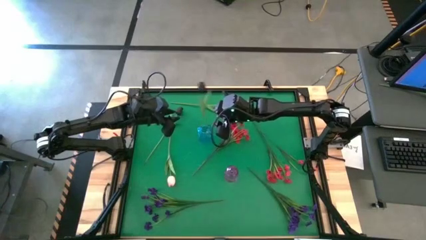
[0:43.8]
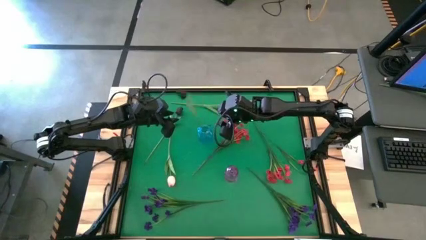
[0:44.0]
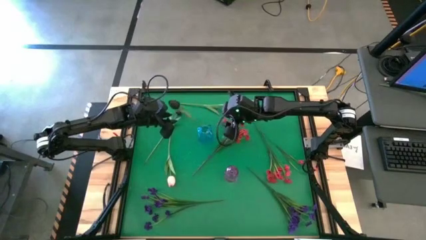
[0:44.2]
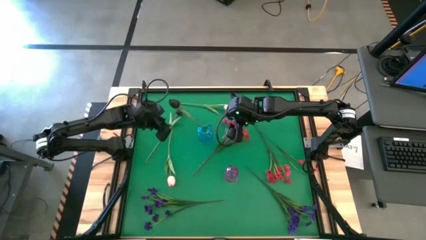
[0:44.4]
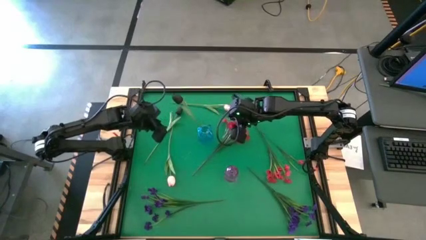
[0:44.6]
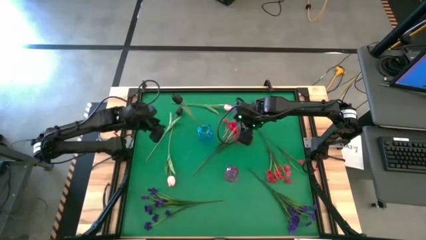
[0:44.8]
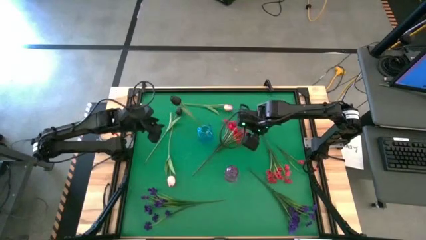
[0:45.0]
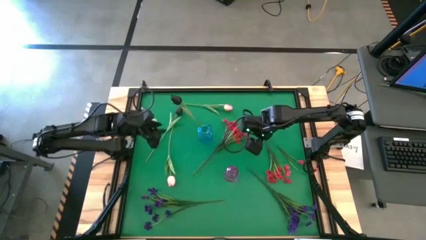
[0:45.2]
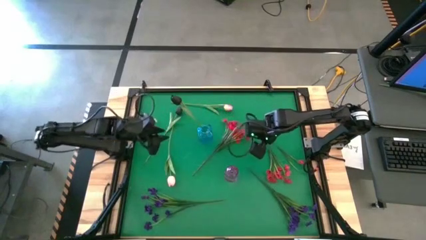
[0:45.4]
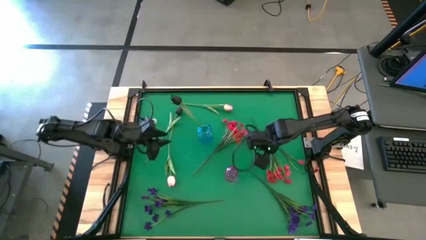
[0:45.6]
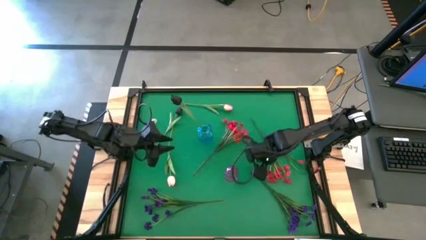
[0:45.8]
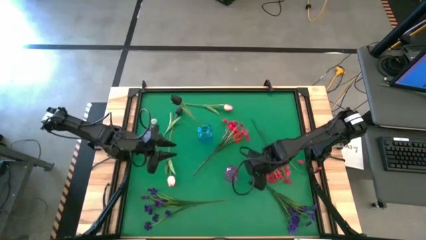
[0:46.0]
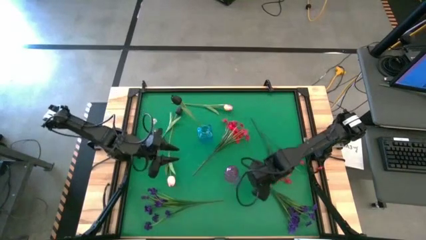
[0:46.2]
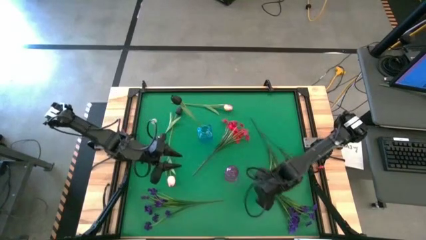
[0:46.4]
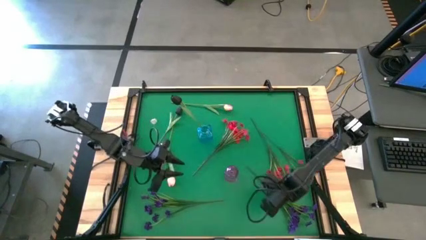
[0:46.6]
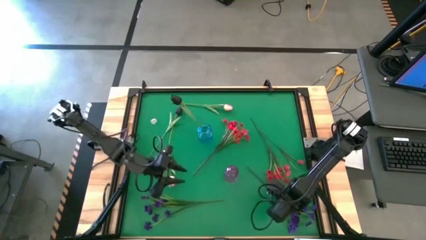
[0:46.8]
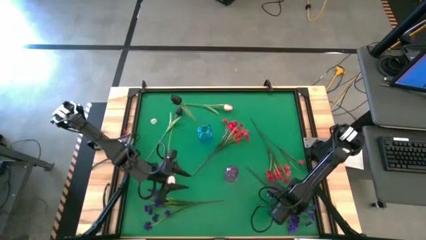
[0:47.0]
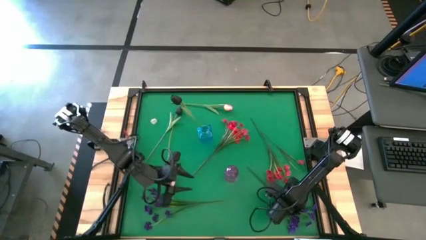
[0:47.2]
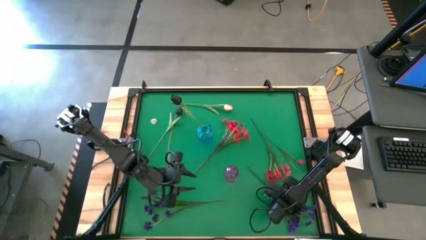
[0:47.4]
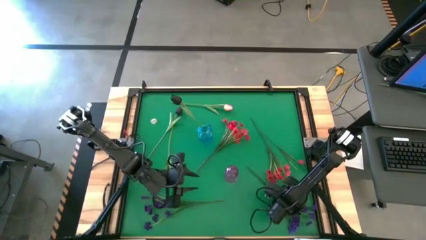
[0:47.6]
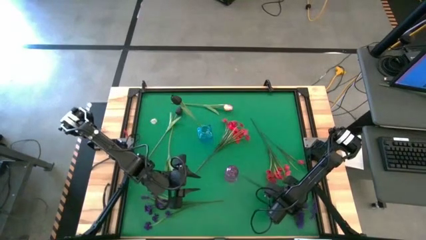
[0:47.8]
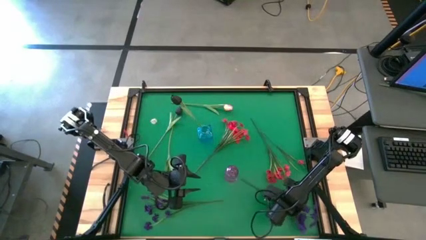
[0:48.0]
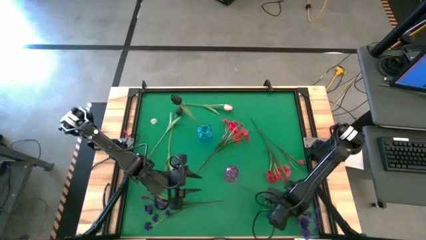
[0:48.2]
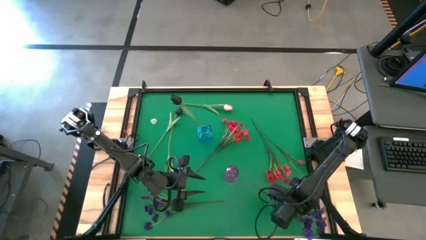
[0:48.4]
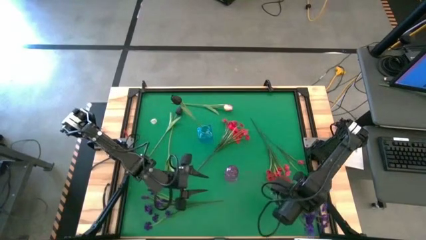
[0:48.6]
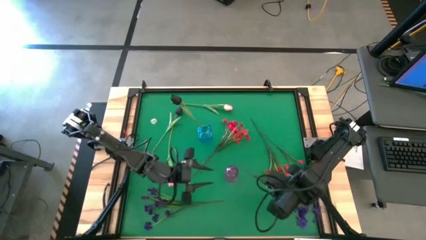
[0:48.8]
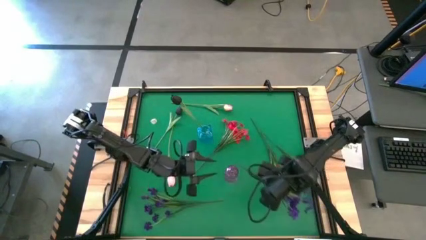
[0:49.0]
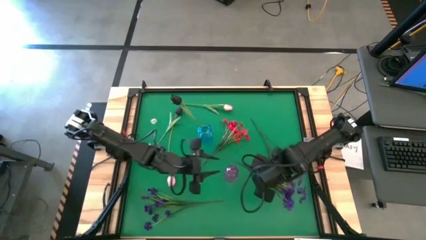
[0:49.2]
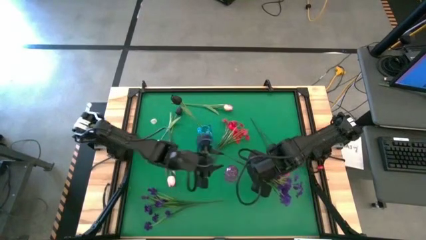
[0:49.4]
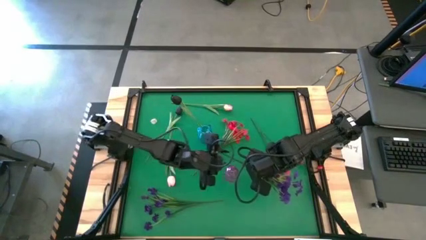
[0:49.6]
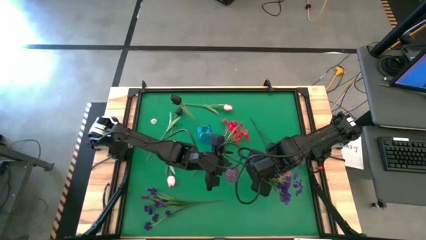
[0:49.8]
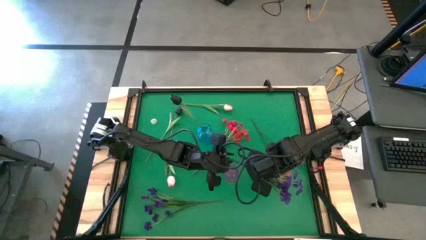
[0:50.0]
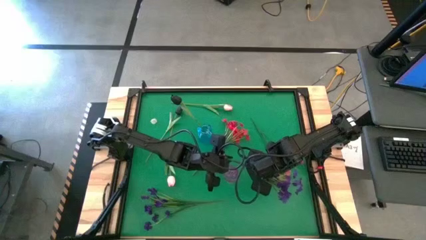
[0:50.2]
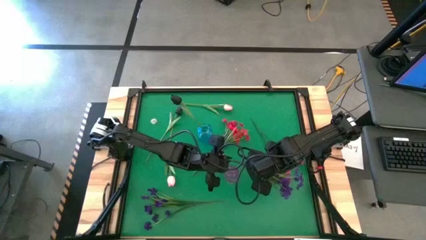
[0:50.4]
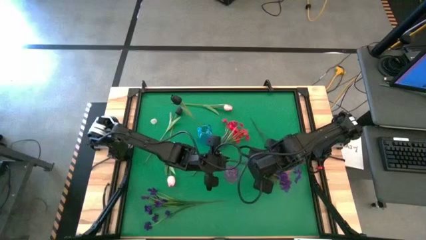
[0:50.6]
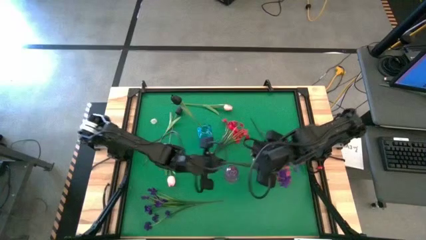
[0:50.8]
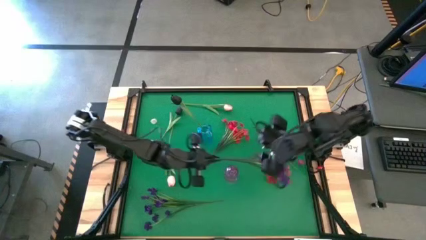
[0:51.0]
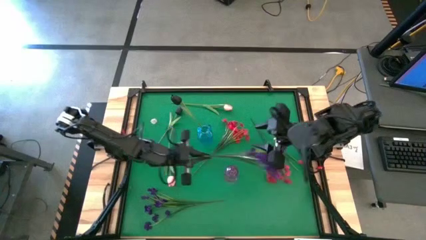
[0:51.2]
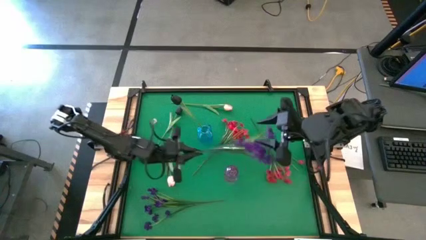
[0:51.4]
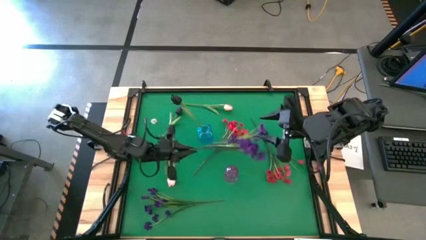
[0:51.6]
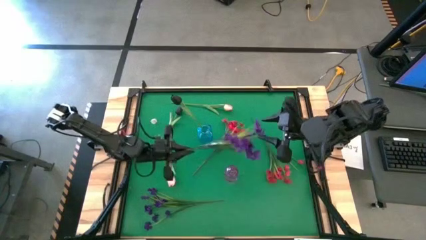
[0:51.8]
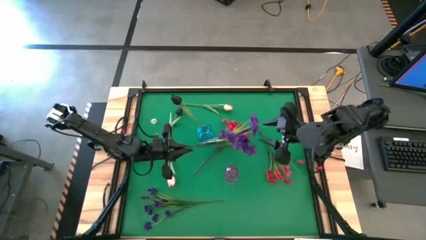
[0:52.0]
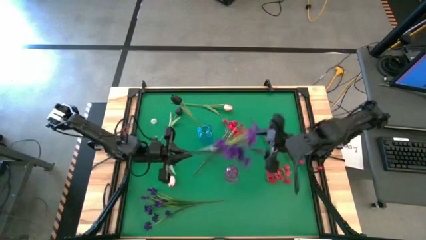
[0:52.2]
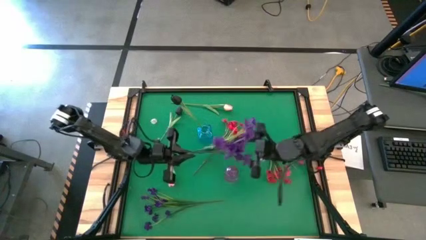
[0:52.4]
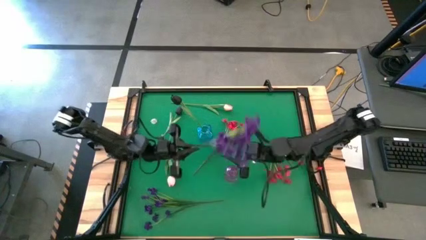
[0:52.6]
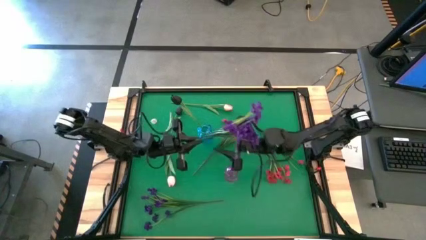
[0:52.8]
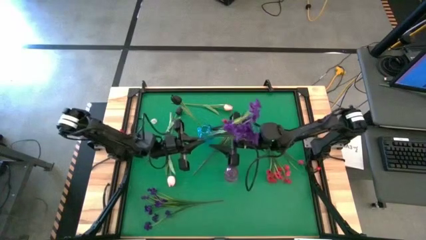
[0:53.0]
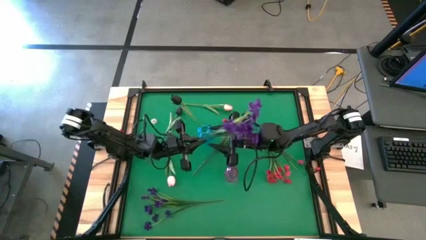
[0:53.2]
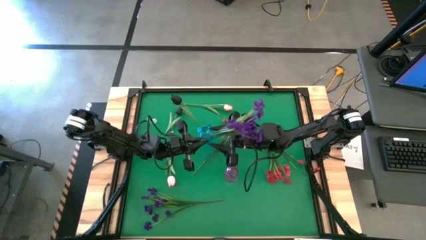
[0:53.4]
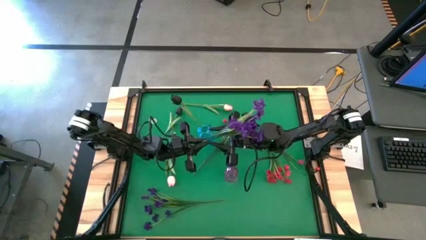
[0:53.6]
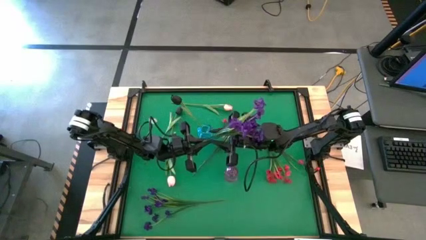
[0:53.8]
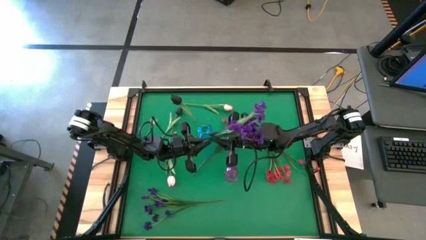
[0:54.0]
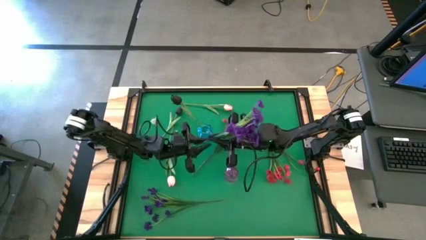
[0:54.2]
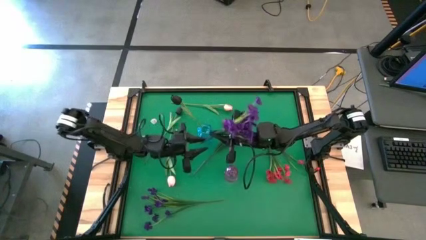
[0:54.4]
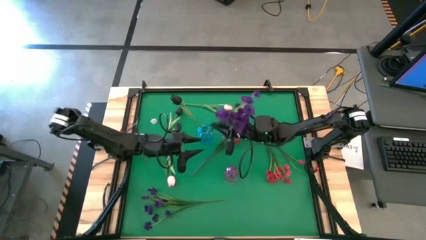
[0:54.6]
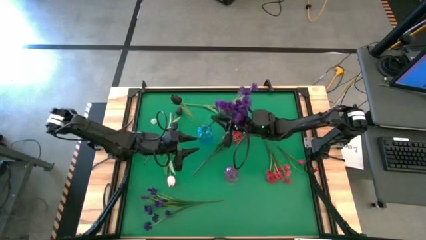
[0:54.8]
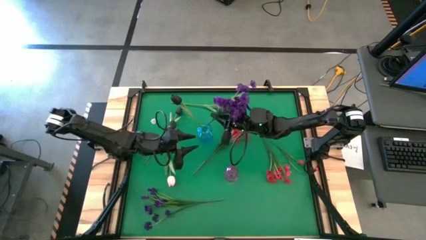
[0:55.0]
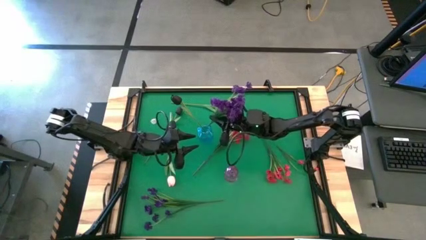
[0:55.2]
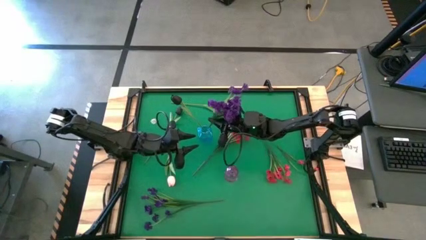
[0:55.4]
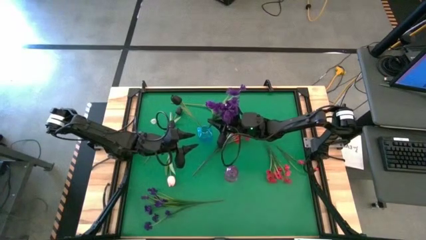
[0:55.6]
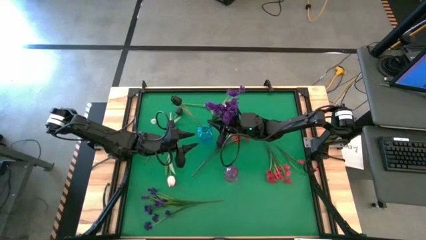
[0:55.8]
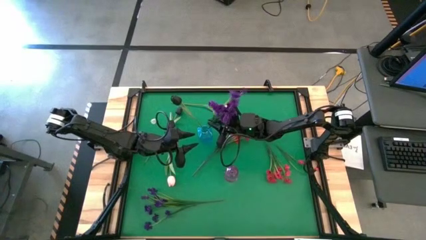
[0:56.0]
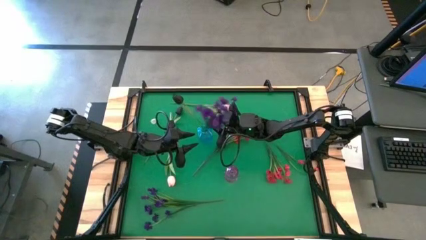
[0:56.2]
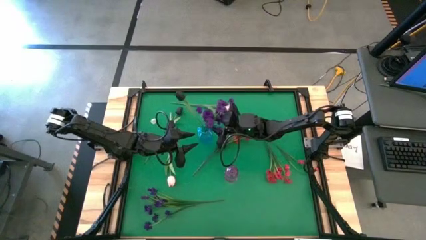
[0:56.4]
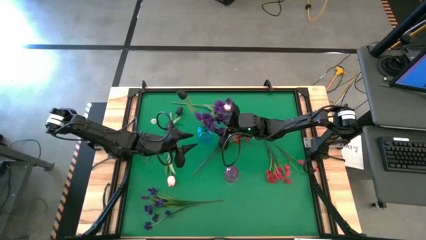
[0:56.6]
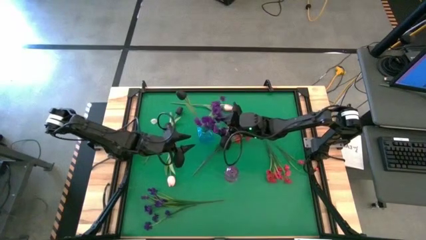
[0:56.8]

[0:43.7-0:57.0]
Task: Sort flowers into vase by color
Put the right purple flowers into the blue vase
